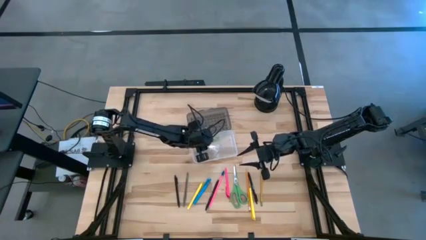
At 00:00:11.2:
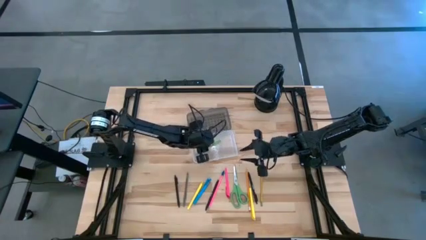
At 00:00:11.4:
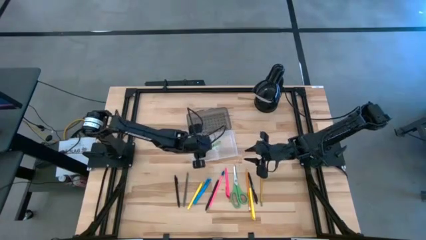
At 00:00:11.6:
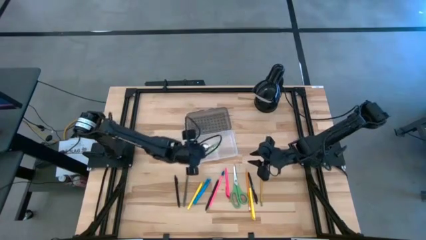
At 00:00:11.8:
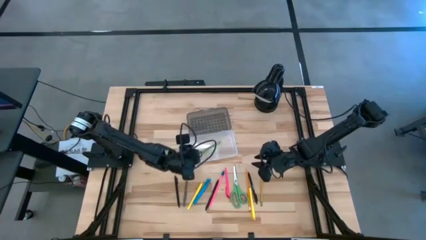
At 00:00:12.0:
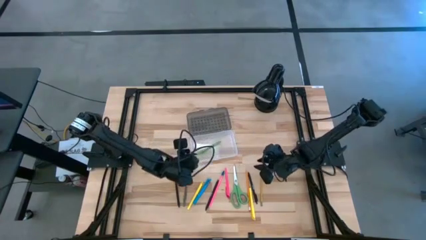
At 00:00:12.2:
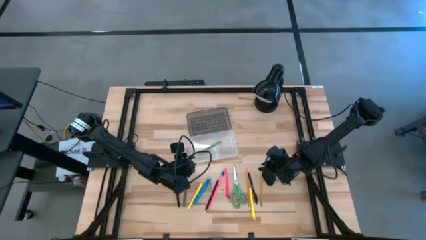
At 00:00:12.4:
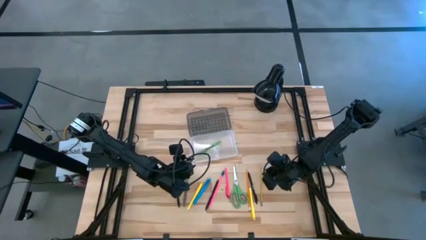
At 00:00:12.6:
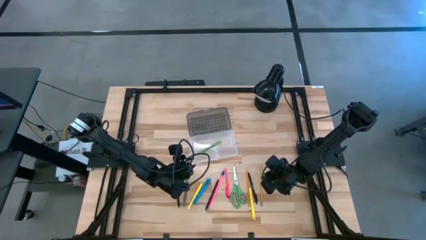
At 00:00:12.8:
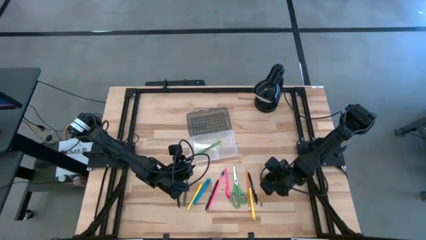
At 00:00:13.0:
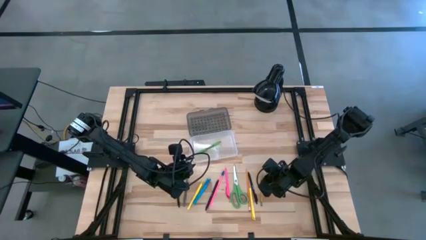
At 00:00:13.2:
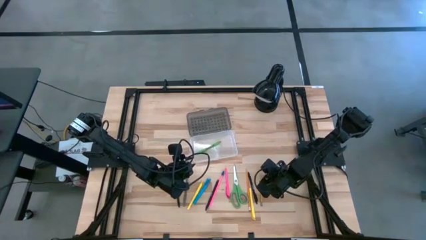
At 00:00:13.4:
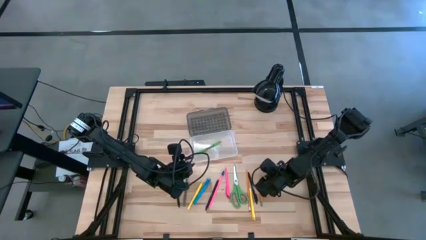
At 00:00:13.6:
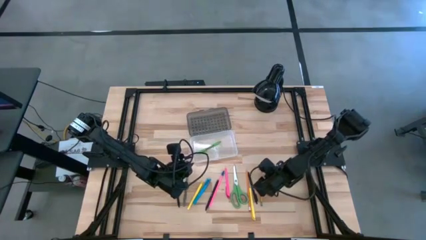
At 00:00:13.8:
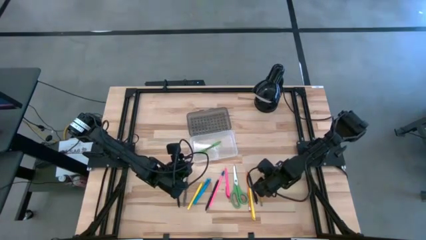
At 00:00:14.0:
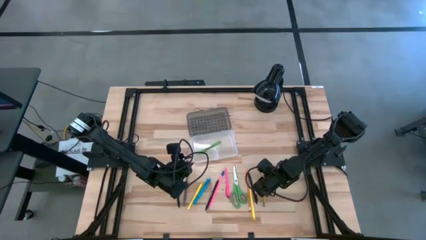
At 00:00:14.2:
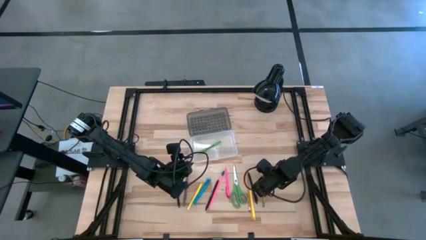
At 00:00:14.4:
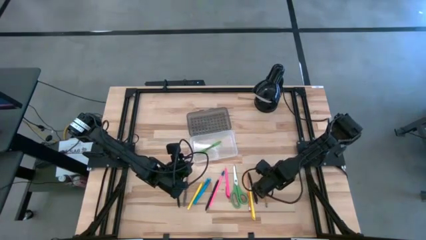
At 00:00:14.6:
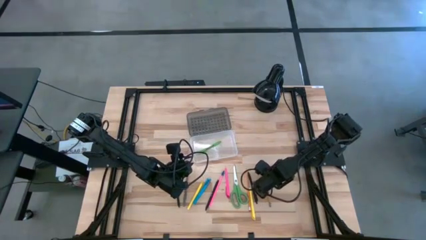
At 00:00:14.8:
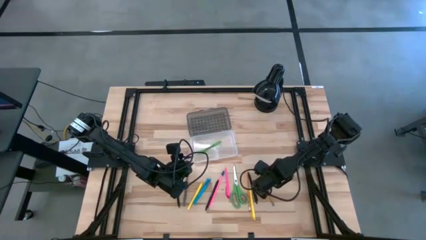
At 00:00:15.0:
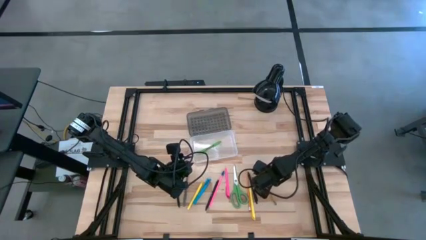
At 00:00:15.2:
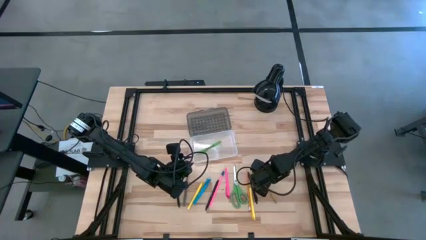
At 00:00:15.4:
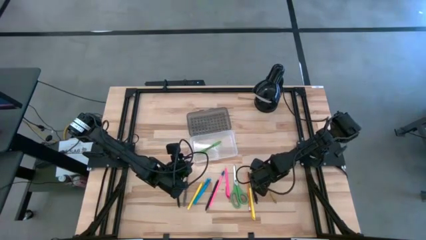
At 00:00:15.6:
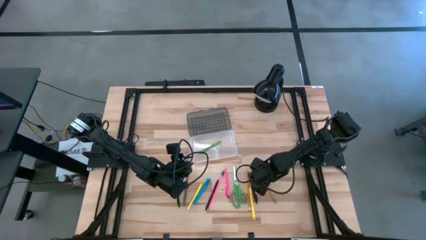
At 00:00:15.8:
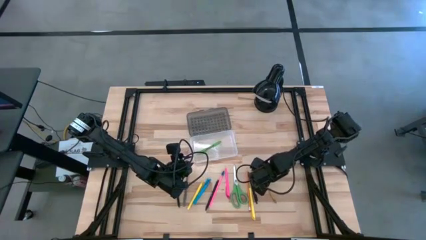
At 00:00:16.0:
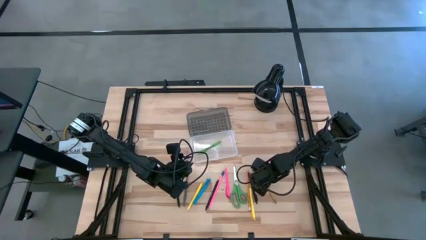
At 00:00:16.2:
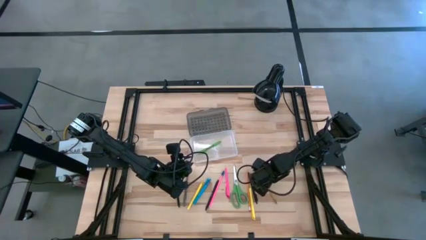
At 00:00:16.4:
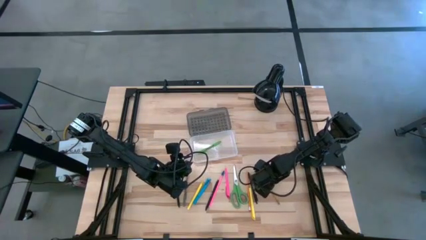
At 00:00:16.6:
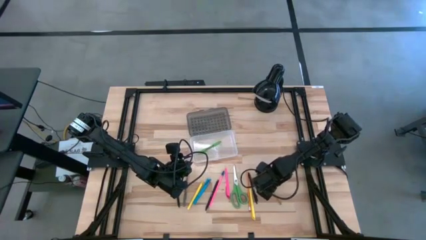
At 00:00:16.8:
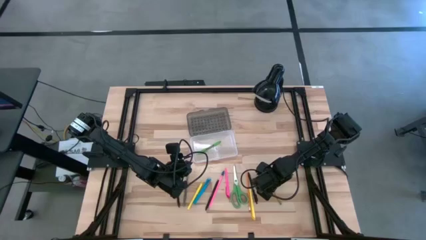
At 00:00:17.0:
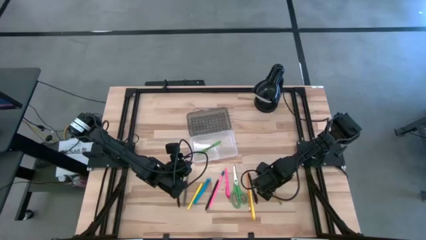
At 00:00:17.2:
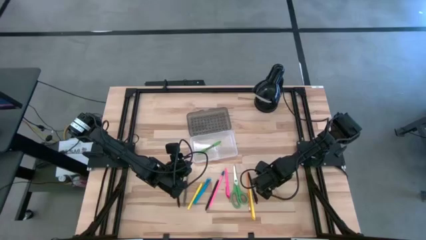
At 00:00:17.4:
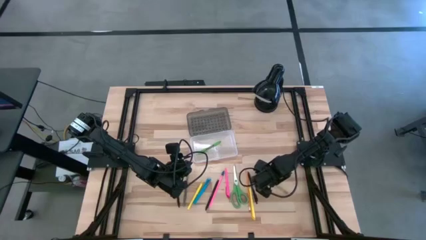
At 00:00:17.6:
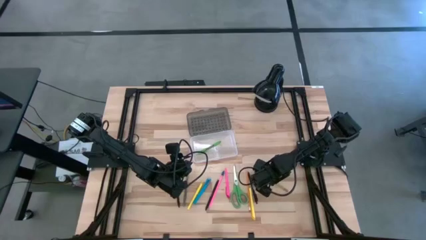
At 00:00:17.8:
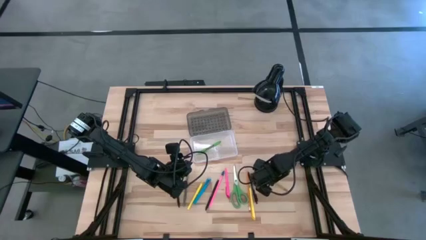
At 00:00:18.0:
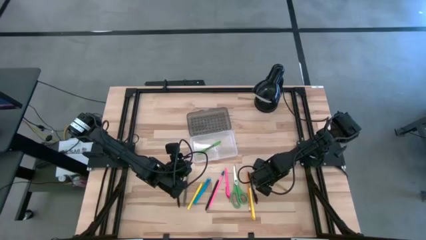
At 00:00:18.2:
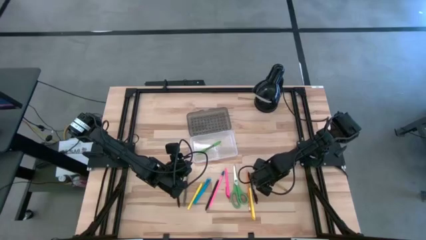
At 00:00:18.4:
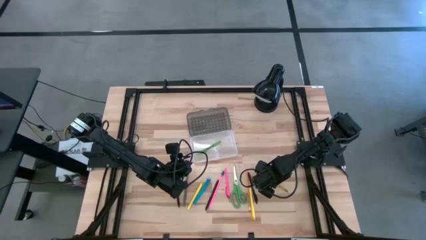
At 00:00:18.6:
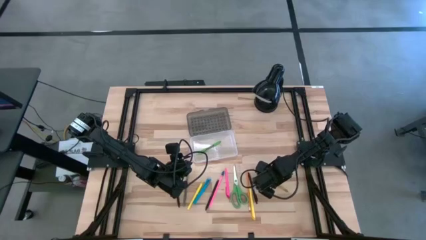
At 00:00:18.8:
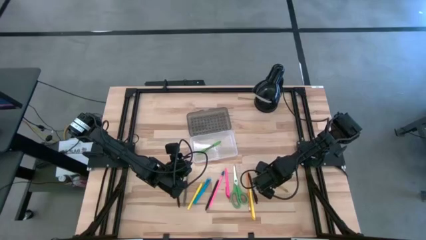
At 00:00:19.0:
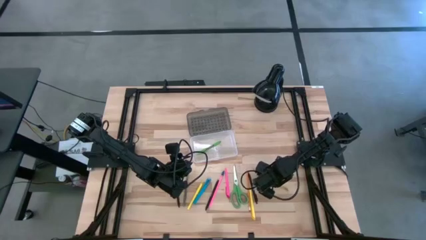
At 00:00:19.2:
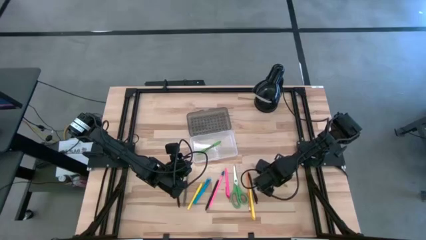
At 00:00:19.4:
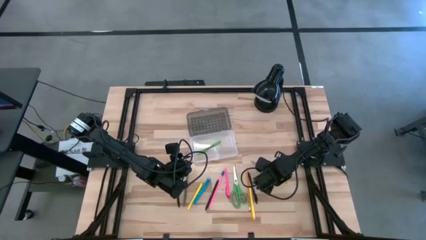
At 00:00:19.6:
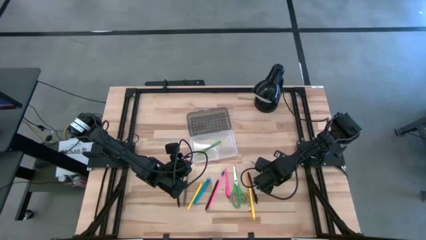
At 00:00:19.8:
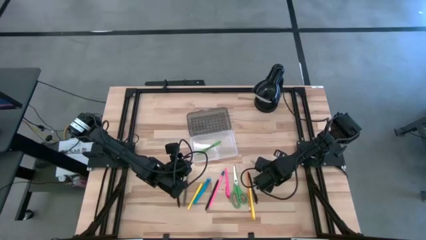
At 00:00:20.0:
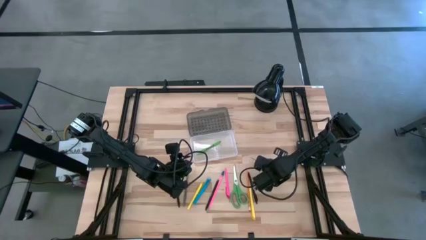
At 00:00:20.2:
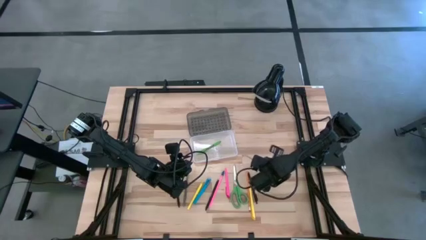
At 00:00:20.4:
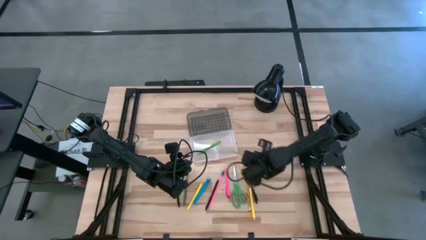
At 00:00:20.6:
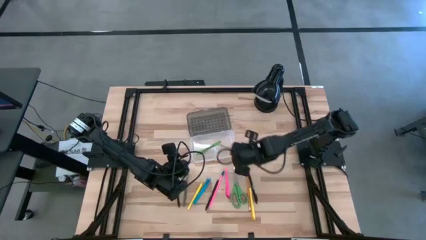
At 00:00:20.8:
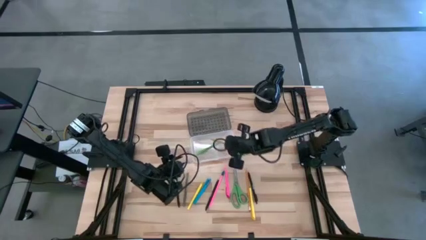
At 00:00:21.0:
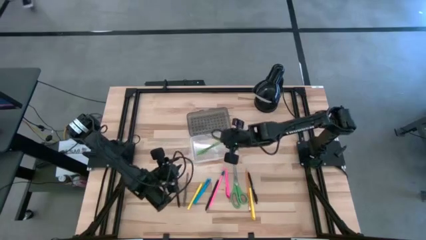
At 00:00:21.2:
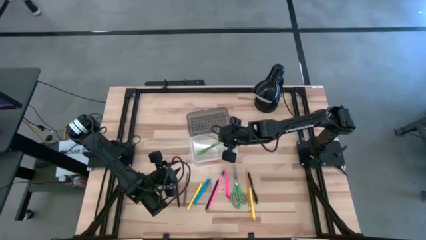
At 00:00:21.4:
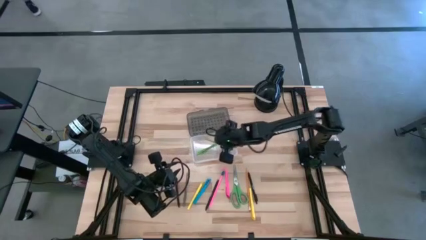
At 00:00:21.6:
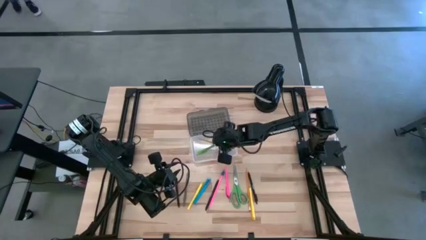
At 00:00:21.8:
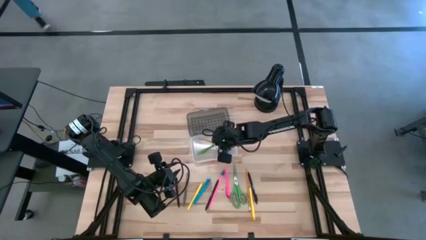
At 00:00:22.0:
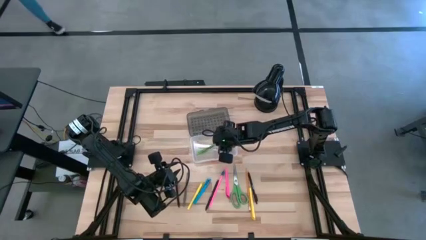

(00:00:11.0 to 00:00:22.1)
Task: Pick & place school supplies into a supply box
Put the yellow pencil into the transparent supply box

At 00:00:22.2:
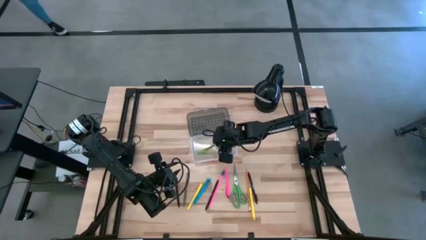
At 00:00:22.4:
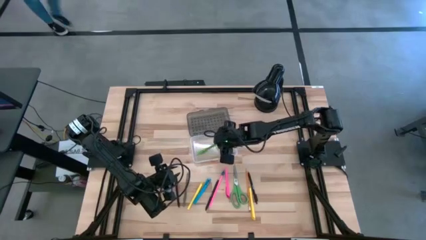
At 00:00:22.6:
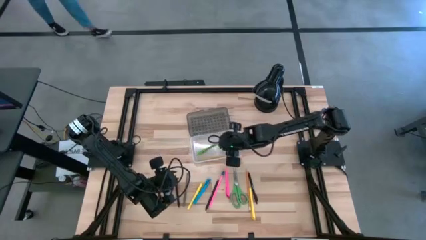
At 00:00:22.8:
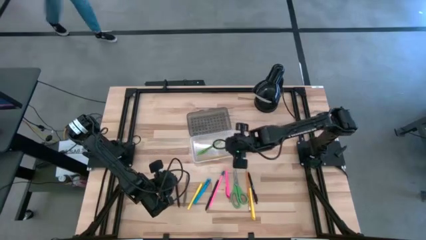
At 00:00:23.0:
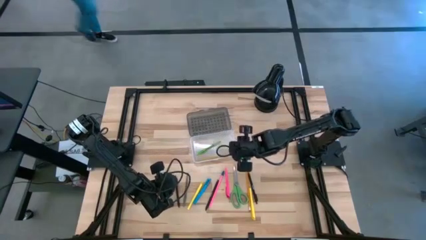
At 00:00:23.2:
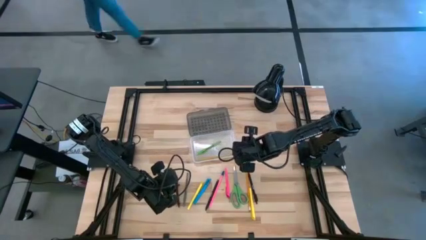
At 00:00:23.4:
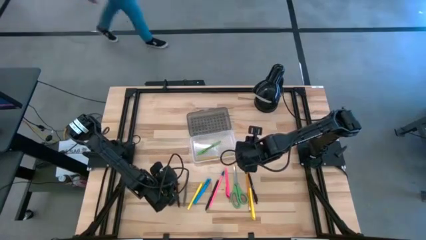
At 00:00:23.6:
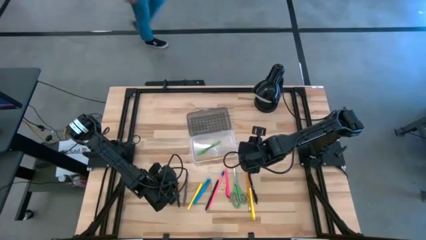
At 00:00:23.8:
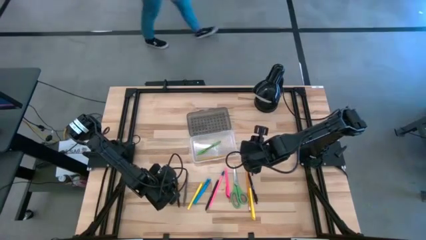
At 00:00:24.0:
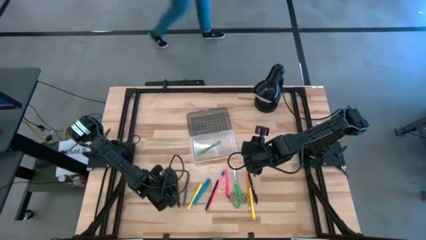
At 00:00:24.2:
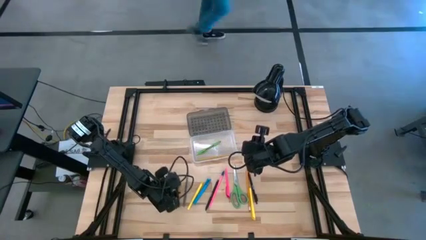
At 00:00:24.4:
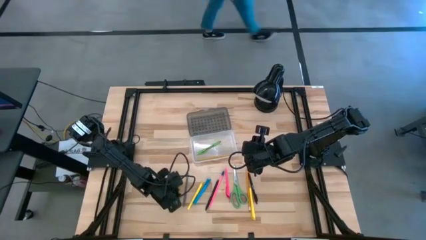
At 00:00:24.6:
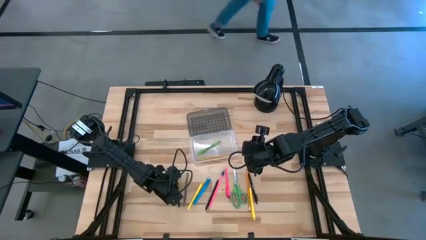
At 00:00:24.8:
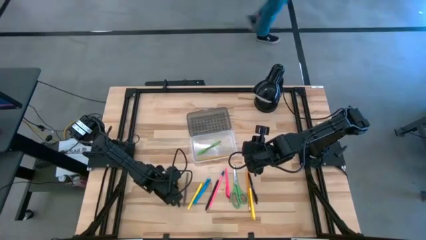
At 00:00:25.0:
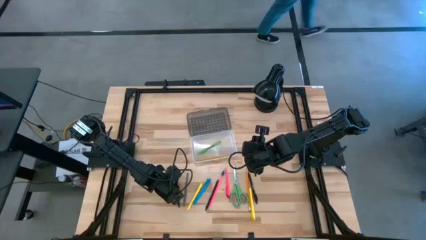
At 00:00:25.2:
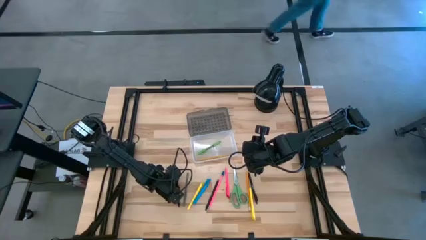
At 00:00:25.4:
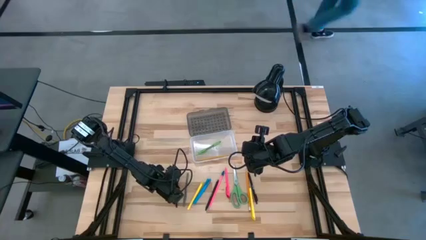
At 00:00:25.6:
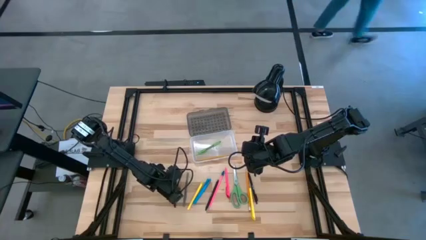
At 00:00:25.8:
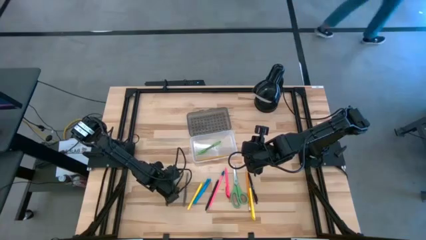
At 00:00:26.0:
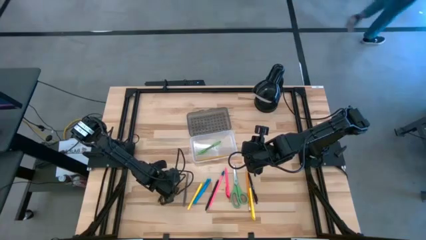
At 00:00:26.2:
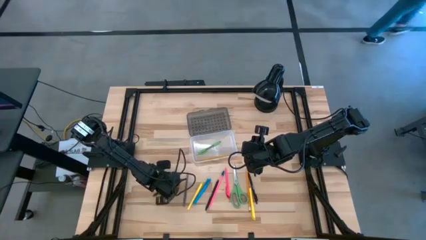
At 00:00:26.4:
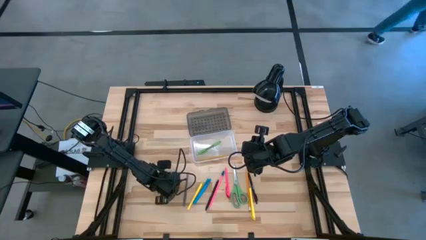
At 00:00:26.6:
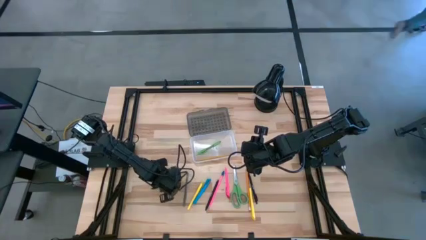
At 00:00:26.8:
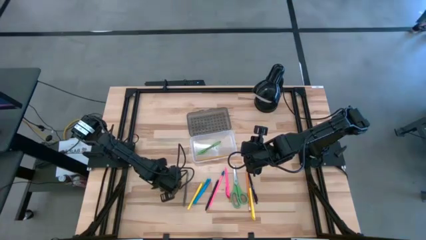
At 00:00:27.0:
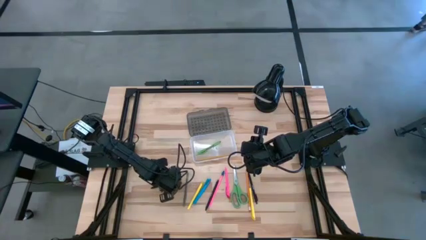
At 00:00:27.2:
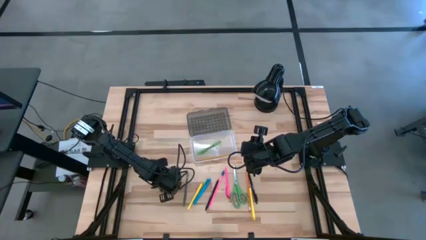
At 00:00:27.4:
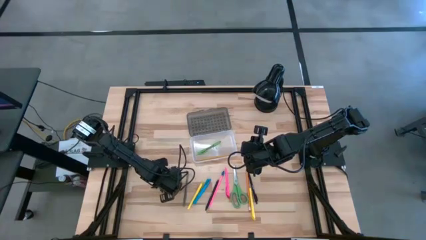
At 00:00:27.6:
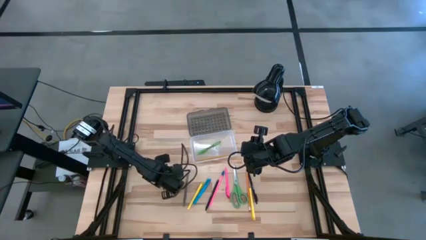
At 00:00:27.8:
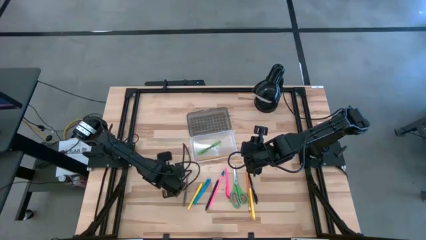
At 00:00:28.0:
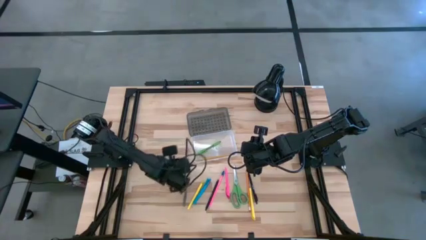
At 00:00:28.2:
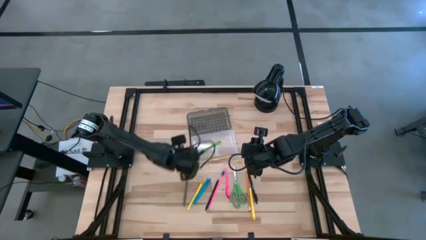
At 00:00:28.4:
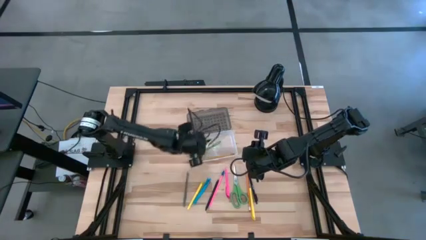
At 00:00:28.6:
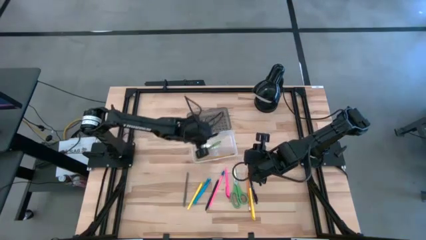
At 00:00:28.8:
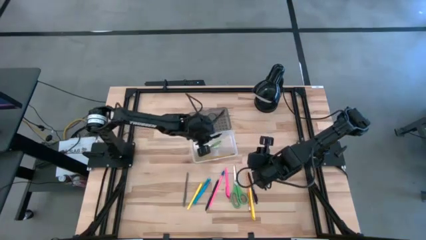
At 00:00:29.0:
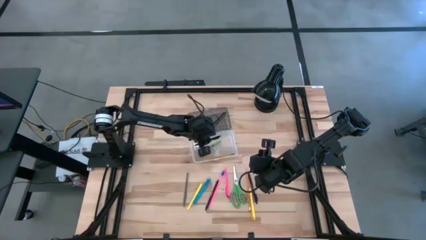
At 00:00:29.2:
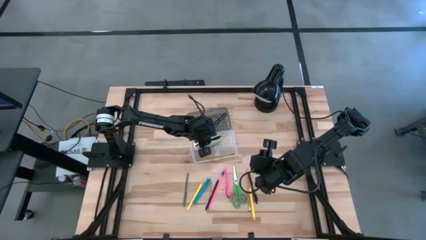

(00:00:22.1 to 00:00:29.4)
Put the left black pen into the transparent supply box
